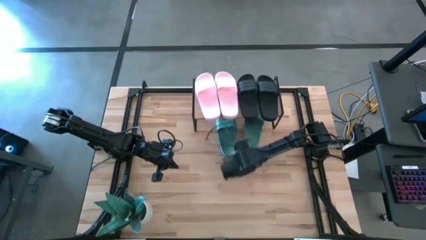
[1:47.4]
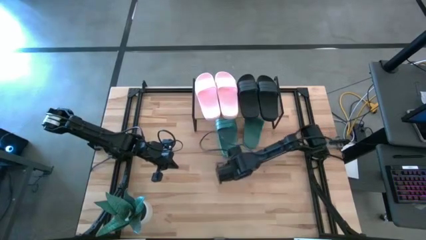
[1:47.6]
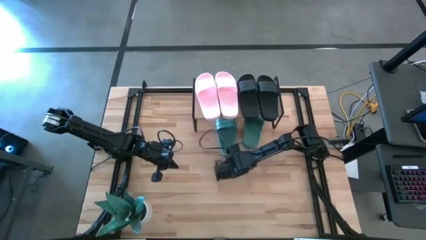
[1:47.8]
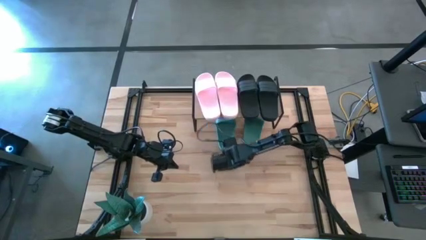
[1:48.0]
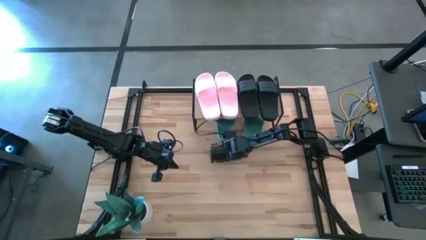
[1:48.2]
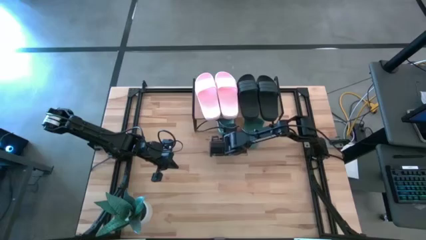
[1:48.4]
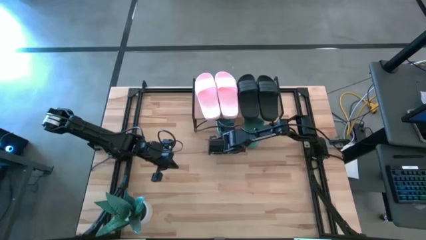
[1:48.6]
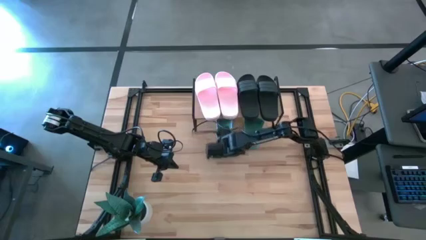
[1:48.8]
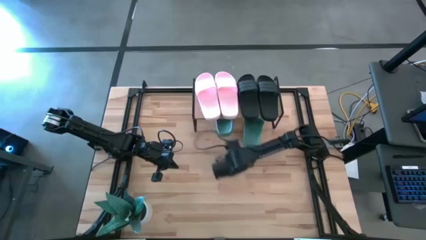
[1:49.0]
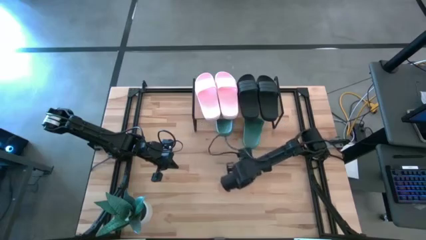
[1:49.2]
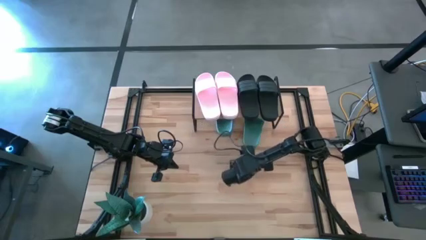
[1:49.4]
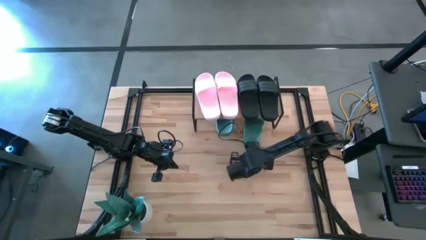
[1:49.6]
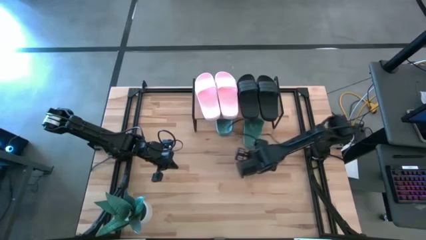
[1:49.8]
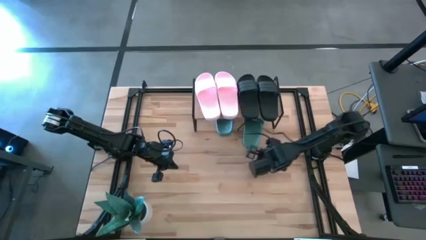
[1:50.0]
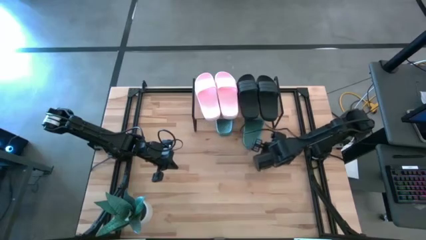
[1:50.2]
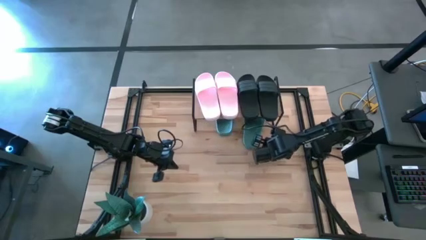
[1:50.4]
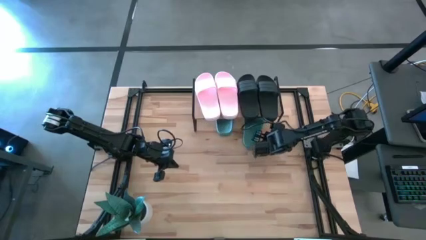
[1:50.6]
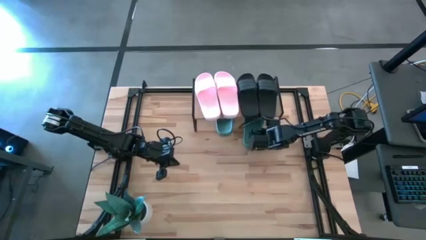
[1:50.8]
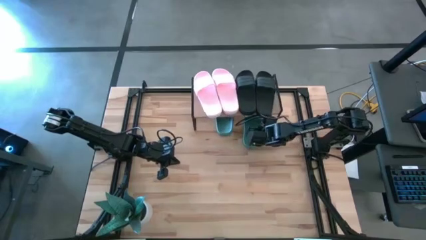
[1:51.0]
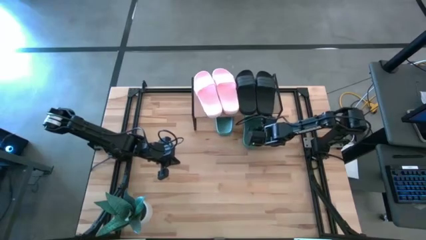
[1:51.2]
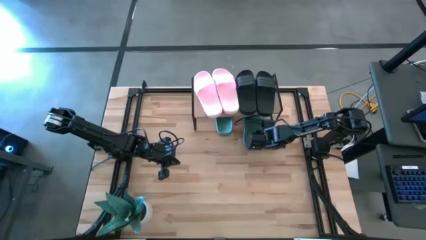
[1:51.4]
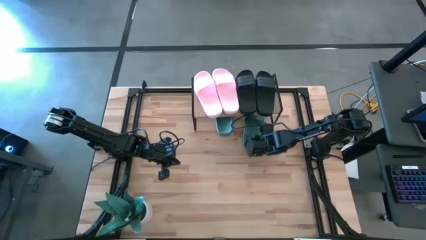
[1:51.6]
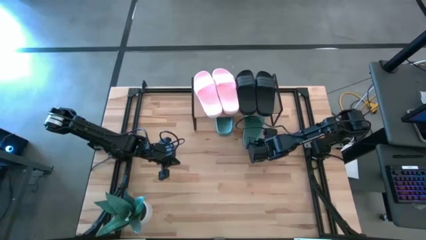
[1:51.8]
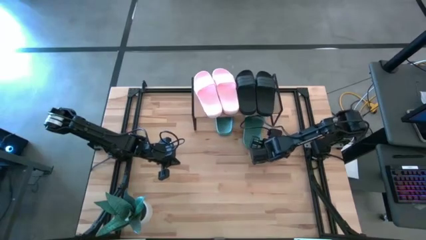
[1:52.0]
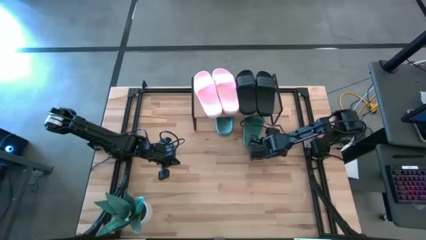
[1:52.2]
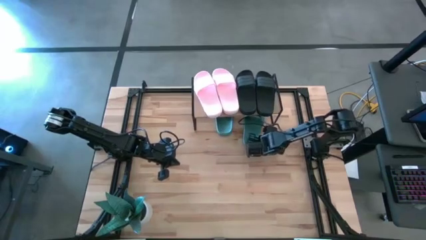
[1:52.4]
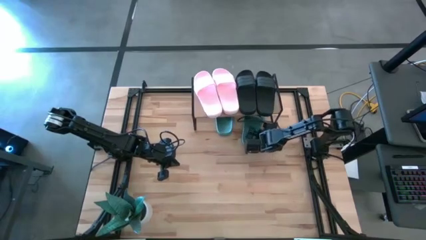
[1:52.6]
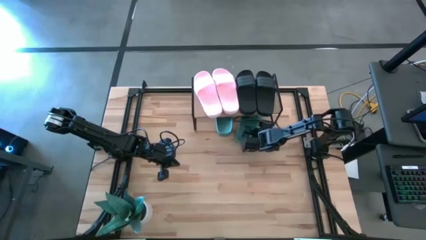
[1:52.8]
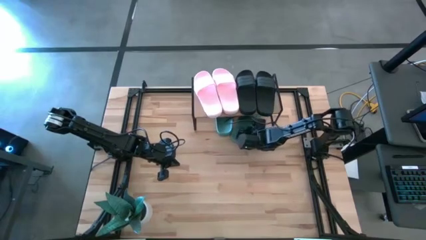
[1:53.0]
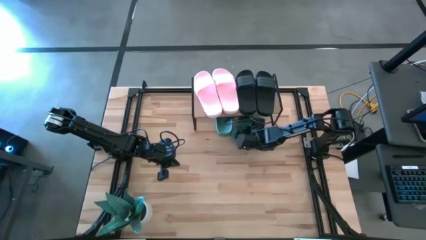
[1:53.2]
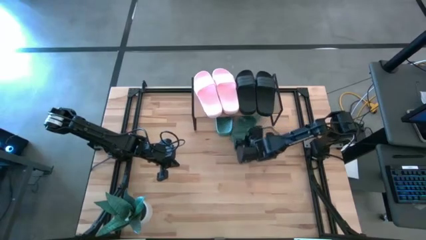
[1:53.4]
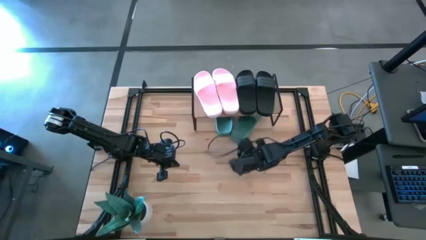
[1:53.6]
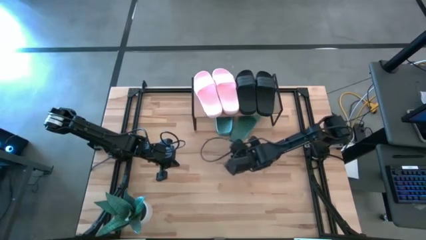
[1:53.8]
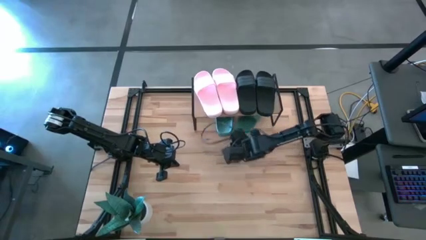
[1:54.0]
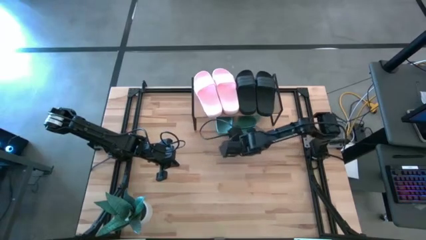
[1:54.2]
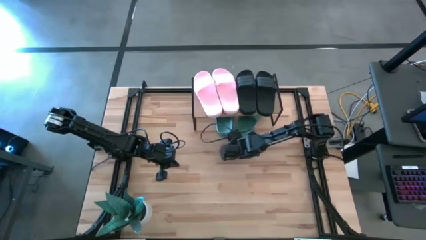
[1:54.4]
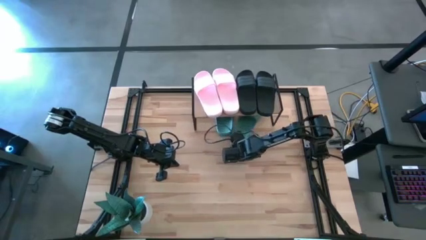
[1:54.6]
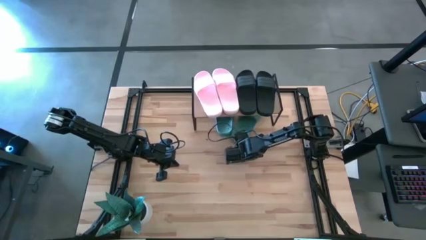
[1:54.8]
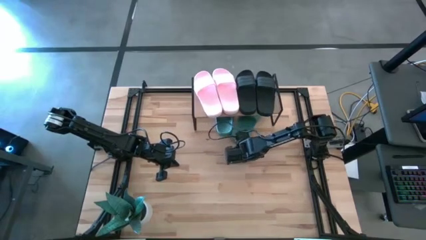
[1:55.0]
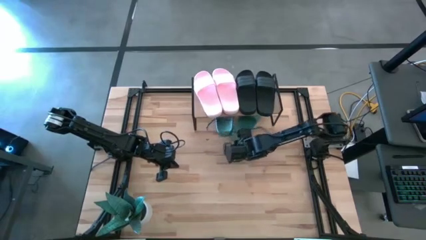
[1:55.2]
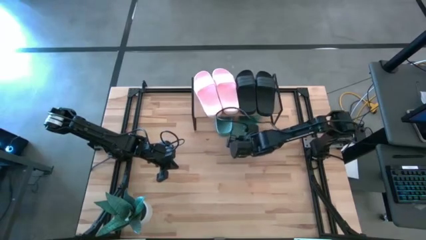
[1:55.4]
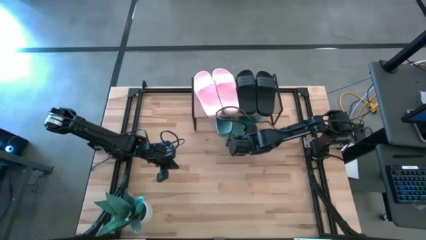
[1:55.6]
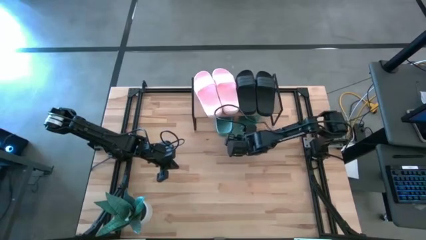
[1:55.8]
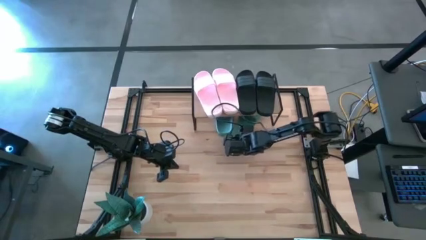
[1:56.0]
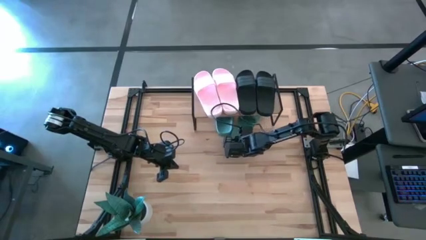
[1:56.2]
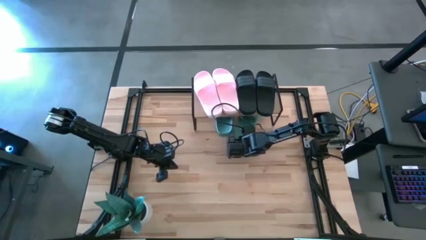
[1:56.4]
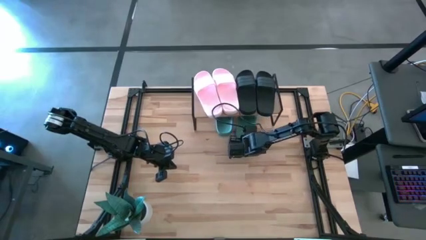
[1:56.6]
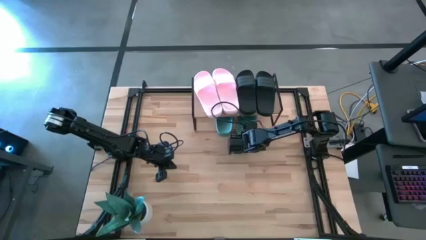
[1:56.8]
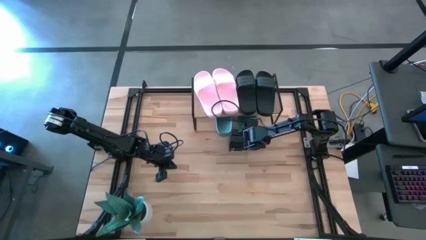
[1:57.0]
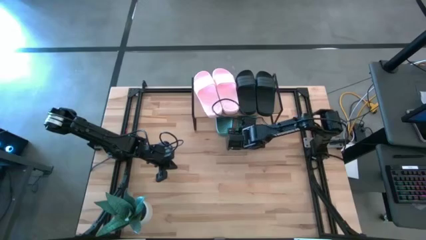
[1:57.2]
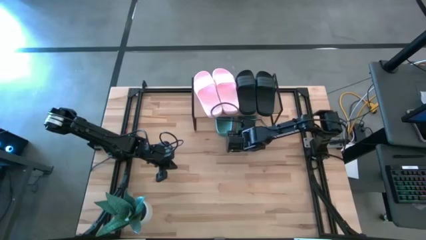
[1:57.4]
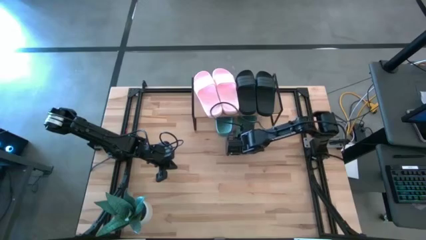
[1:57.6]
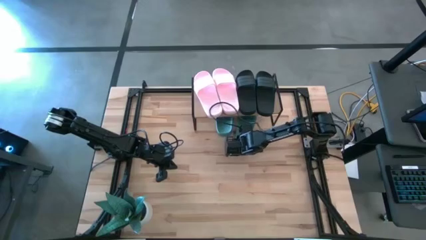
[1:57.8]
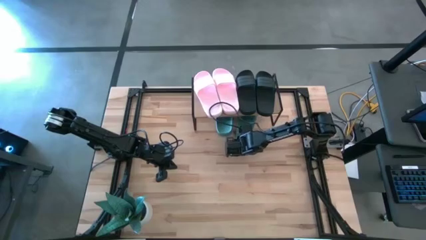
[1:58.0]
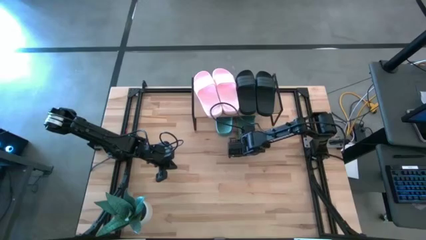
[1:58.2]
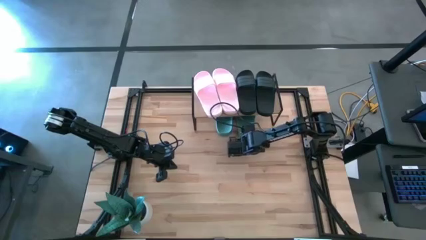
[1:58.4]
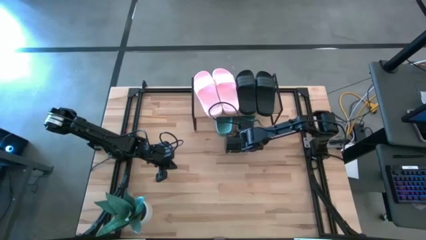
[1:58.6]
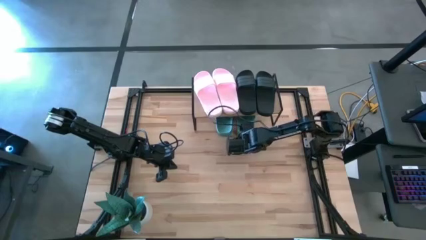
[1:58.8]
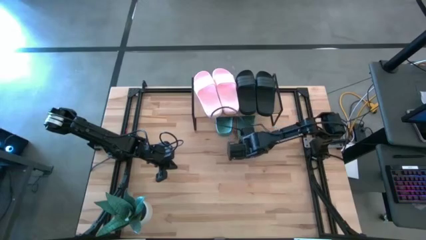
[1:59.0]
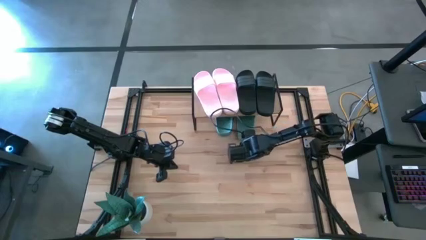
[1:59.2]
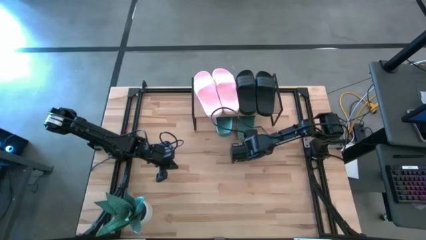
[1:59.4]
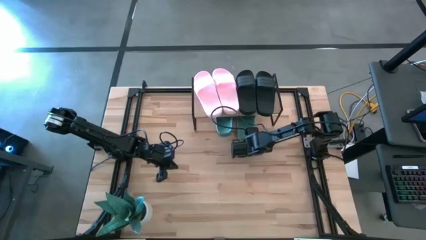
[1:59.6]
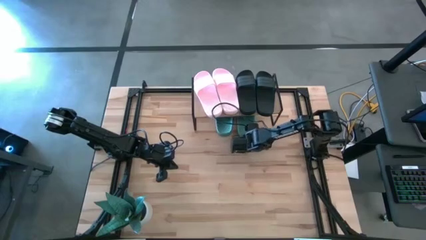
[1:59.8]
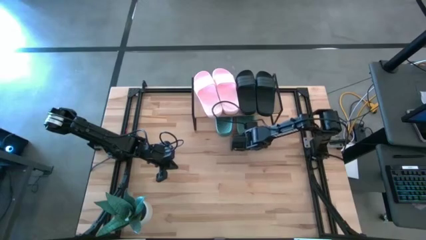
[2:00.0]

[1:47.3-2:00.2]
Task: Pick and place slides into the shelf
Adjust the green slippers under the shelf

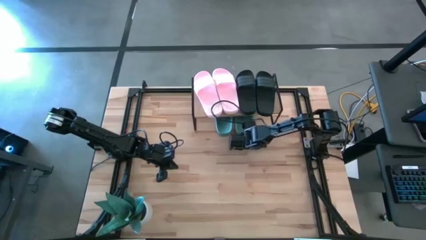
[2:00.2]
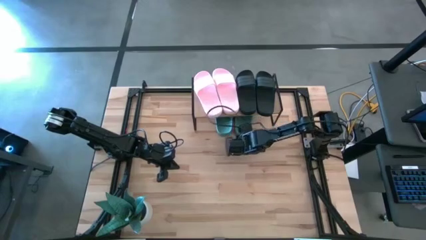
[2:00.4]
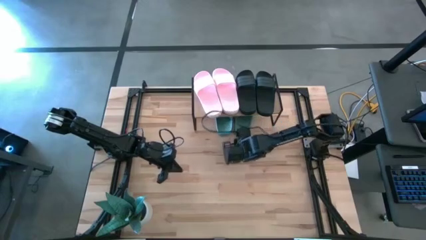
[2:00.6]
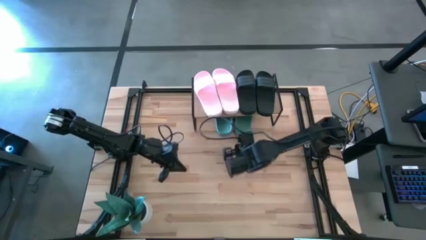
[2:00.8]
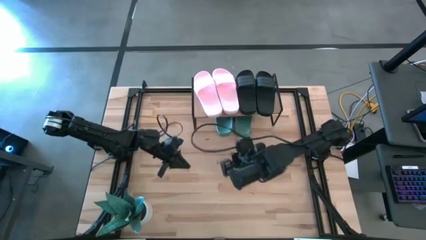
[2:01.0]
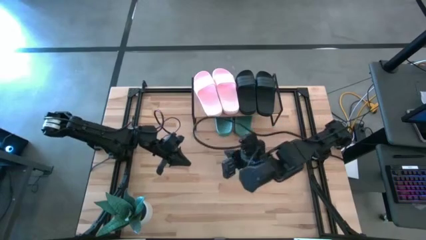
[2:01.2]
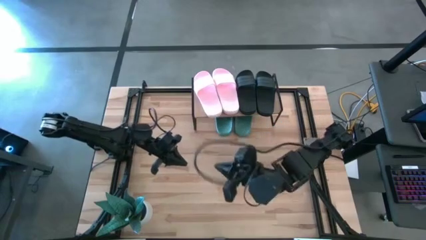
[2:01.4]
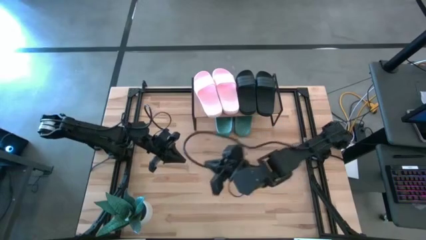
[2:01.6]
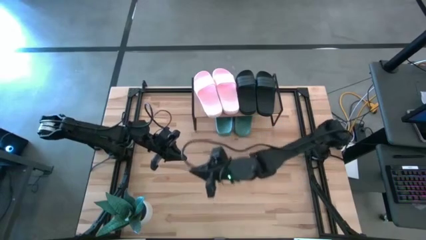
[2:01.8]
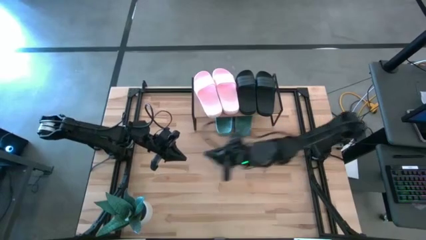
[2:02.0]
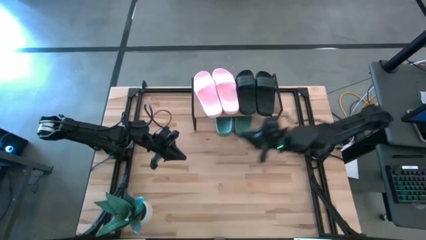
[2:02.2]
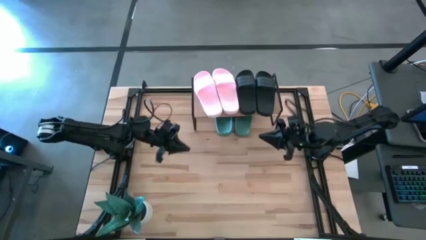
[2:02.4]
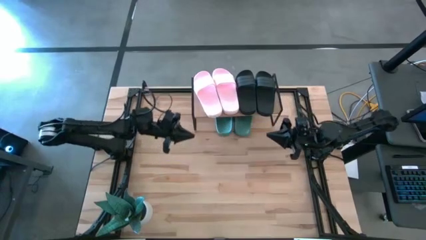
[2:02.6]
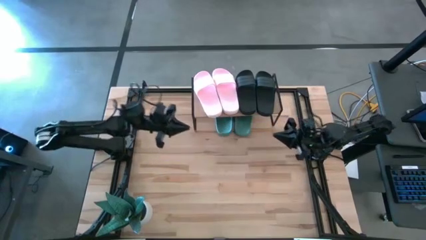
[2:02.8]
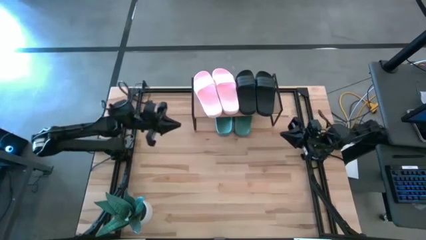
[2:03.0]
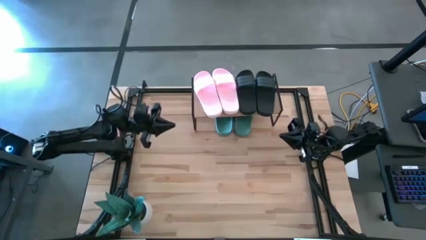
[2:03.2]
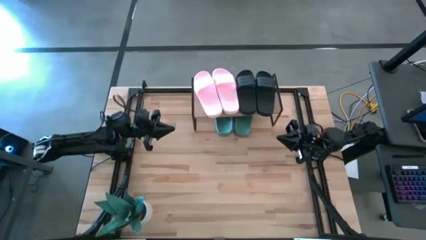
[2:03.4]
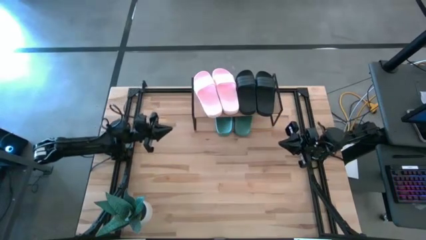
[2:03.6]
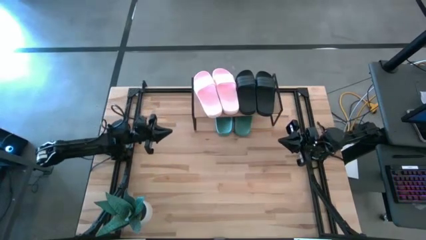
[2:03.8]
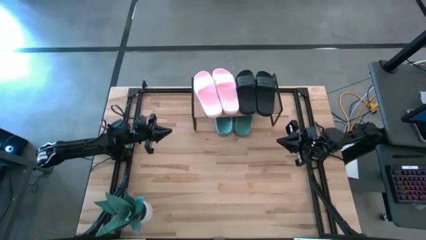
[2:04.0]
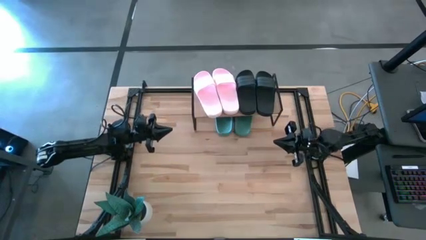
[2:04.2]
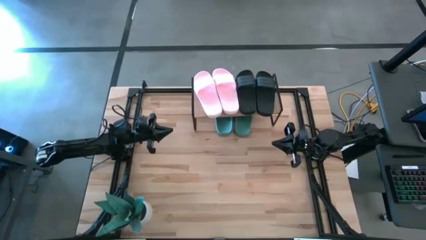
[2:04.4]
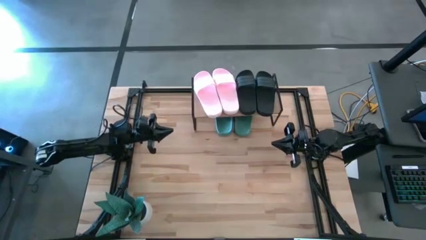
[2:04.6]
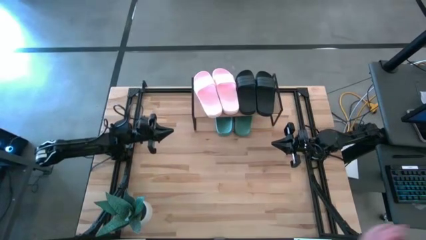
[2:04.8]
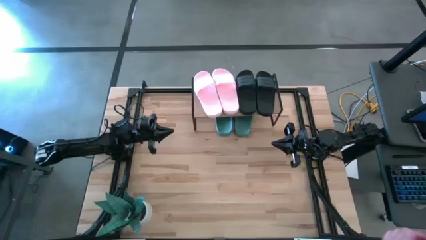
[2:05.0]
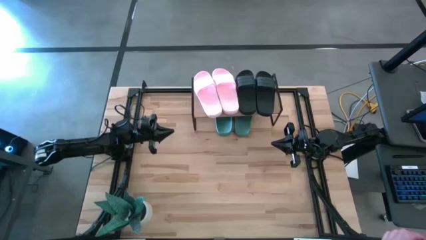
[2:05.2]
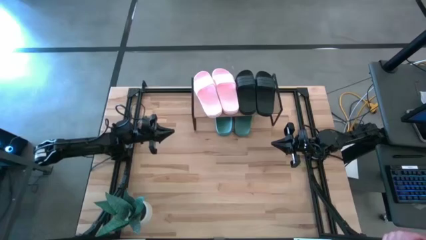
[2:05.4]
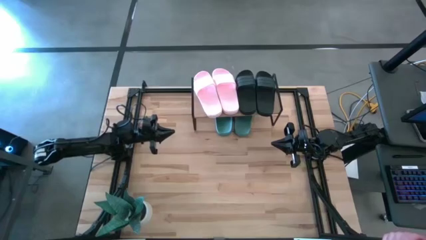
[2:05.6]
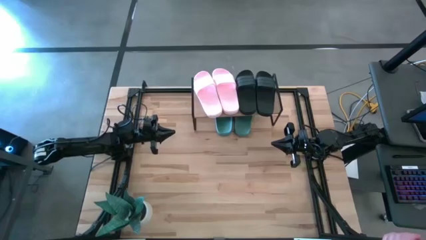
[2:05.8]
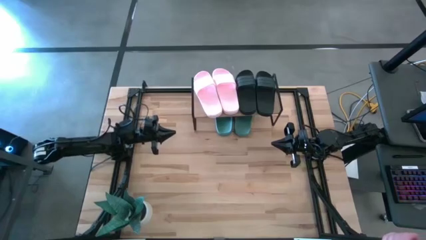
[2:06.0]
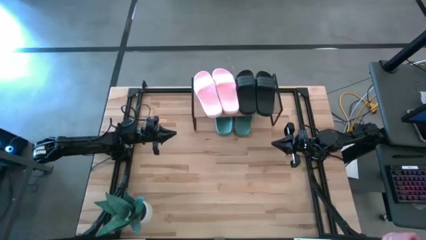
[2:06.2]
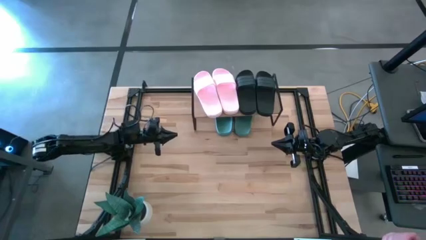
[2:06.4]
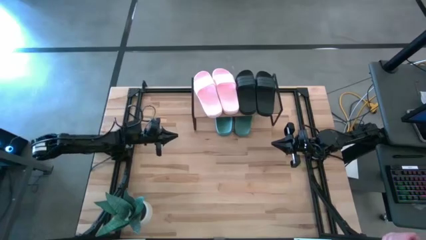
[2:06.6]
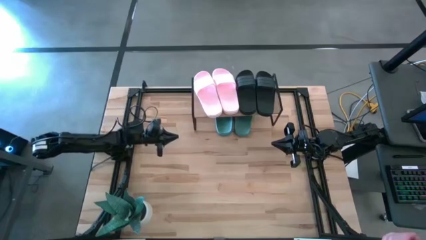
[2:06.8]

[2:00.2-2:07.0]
Return to Home Position
